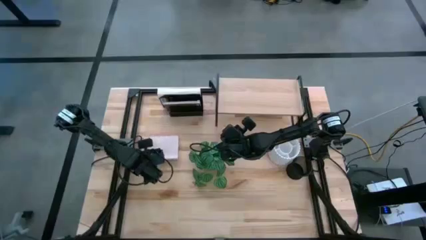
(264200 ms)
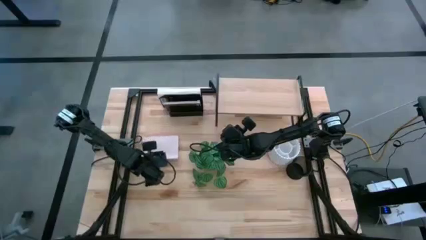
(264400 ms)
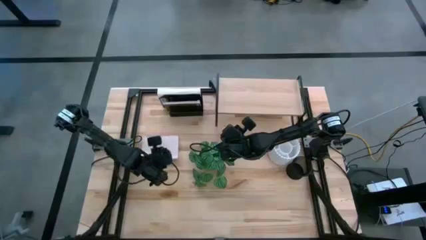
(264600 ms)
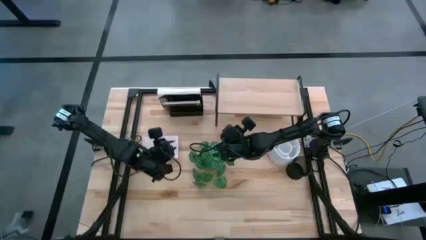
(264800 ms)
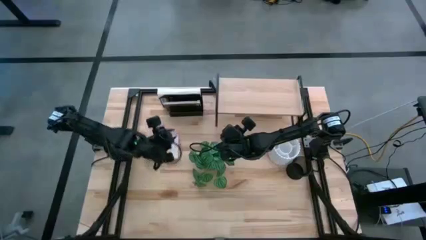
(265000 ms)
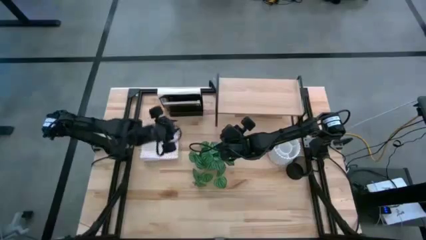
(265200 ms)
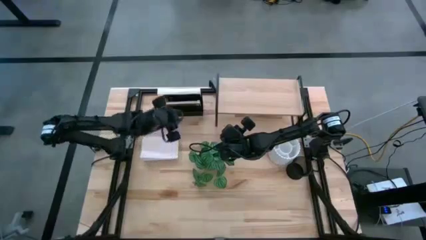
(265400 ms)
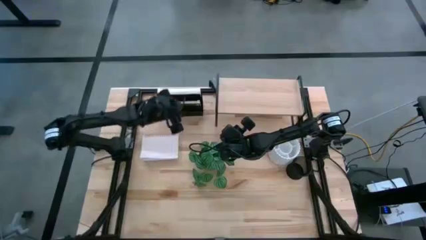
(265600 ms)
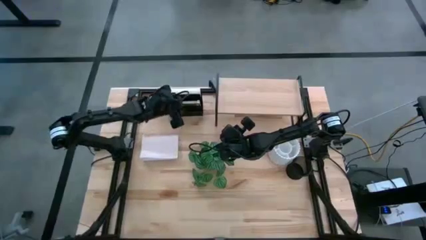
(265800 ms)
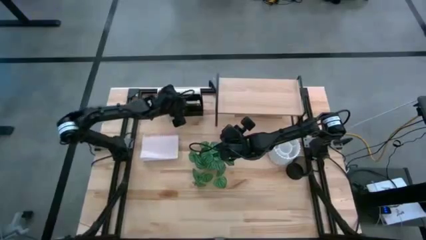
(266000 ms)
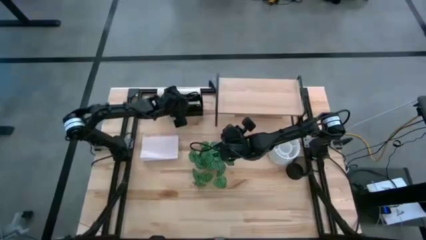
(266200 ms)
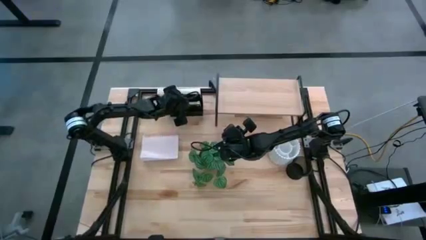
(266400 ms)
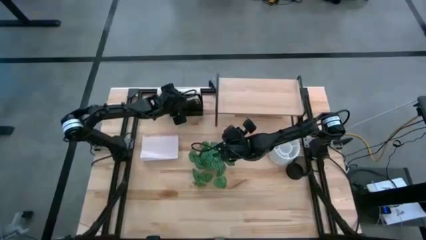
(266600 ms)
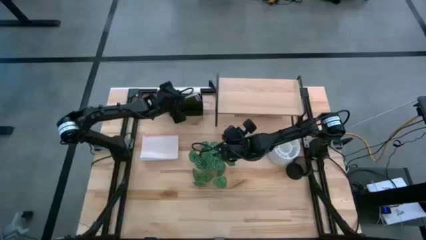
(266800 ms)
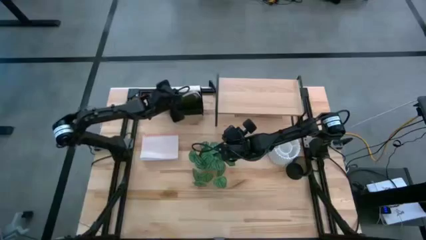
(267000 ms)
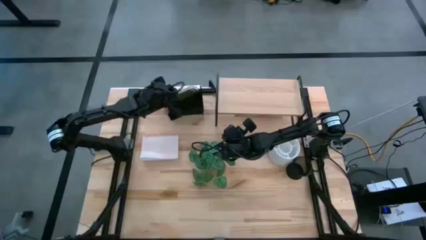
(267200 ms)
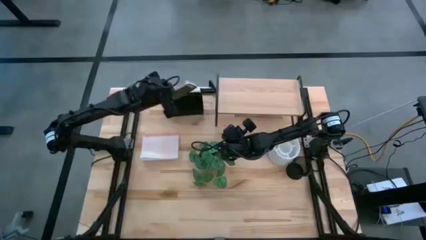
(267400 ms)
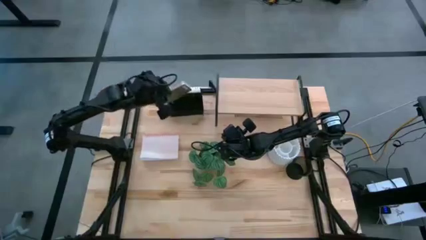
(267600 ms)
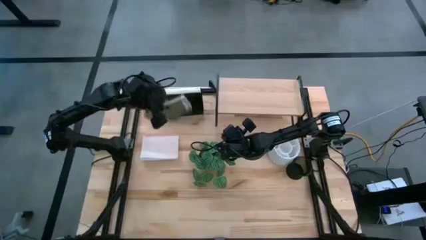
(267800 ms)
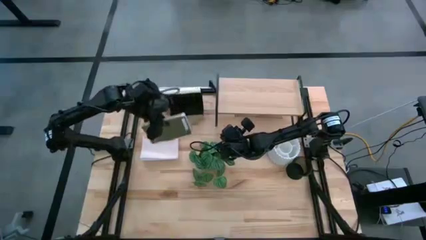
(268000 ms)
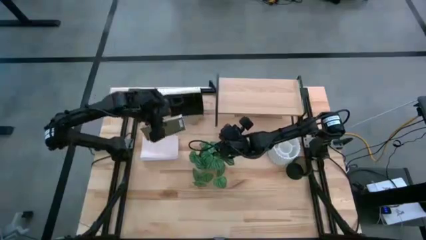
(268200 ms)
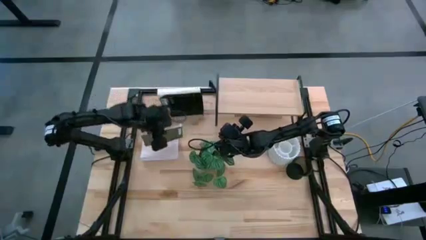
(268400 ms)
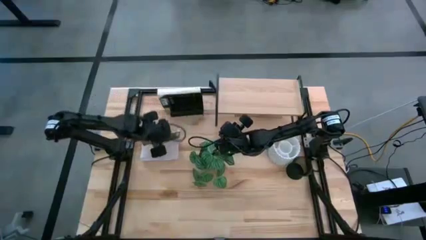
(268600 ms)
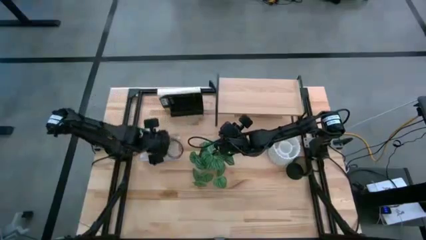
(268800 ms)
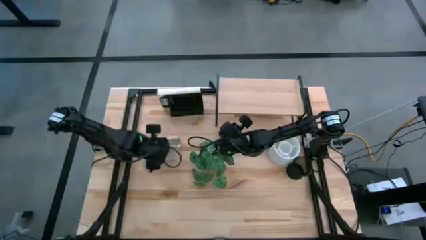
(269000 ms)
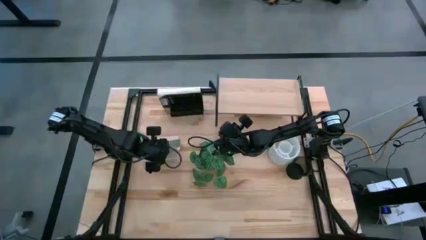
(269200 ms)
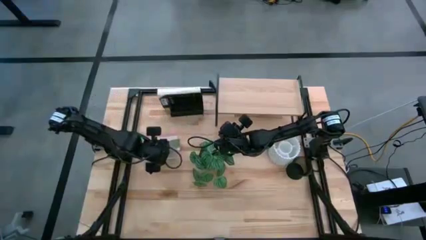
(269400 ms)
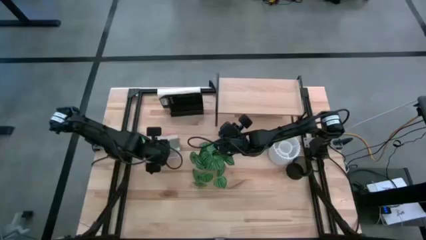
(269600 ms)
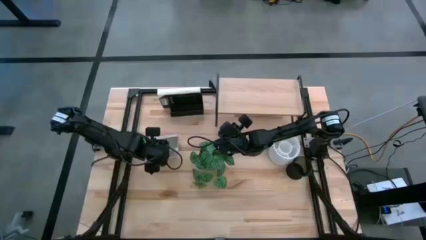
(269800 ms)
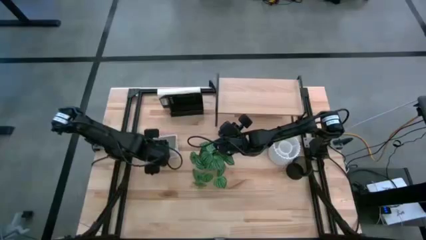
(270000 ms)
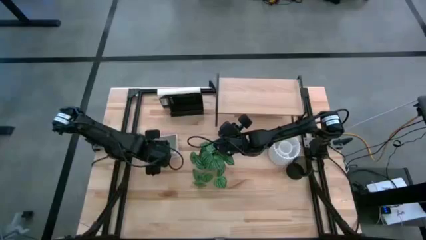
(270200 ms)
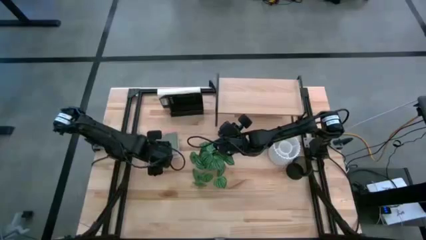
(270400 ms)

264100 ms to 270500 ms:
Task: Stock shelves
Remove the green notebook from the black mesh bookshelf

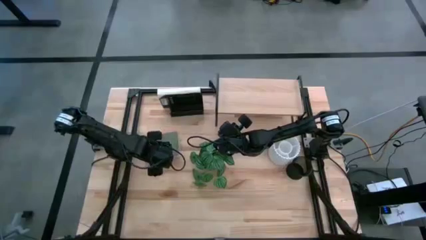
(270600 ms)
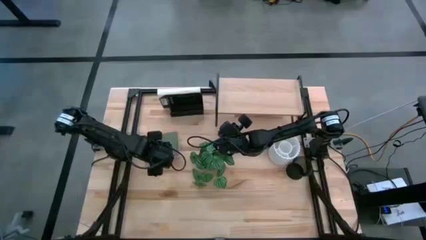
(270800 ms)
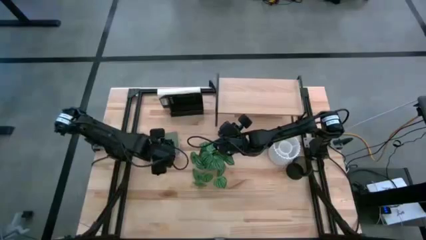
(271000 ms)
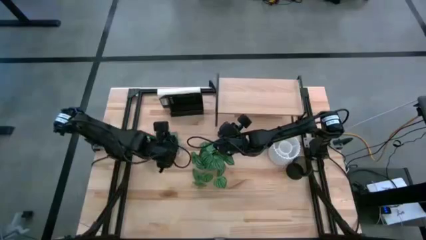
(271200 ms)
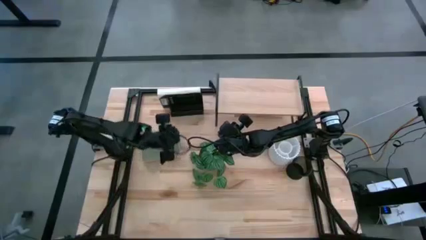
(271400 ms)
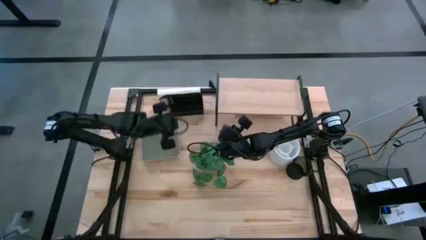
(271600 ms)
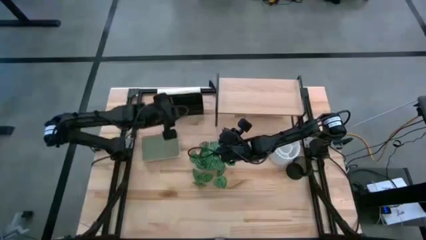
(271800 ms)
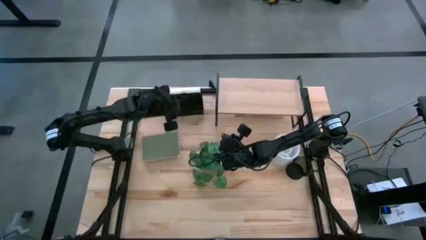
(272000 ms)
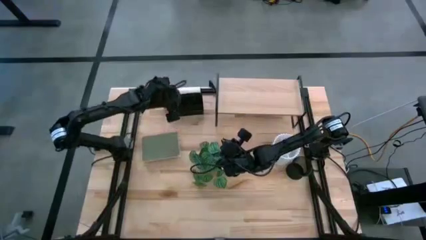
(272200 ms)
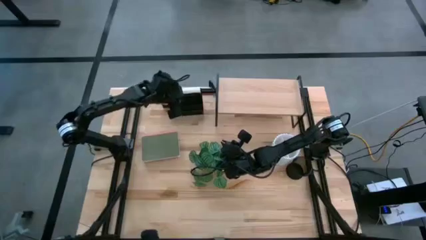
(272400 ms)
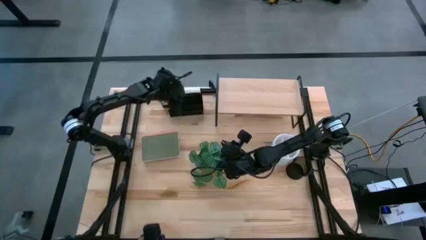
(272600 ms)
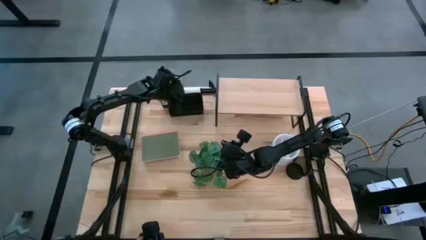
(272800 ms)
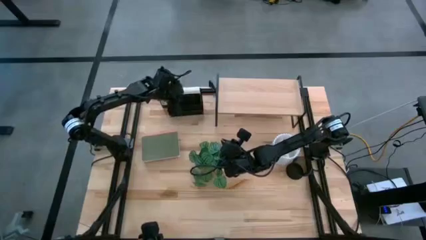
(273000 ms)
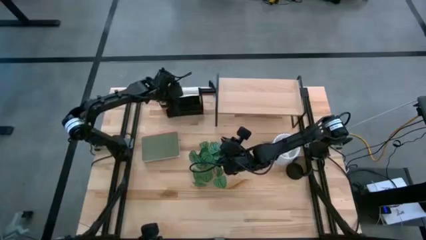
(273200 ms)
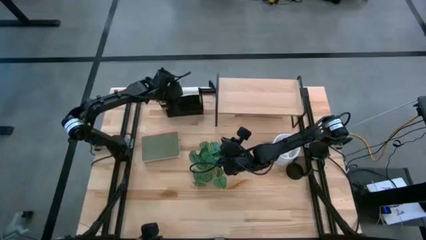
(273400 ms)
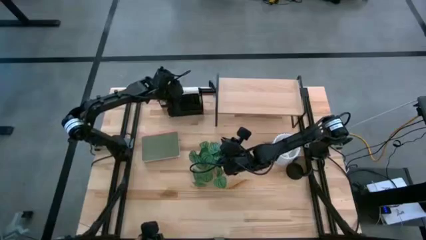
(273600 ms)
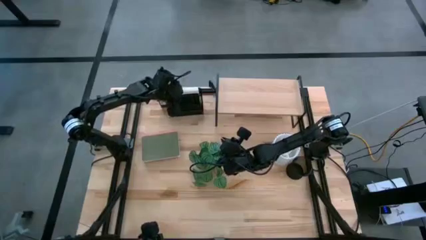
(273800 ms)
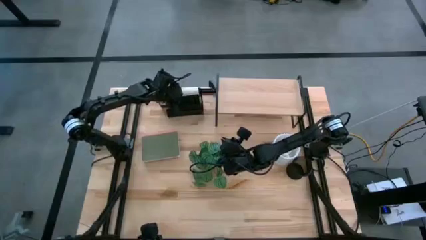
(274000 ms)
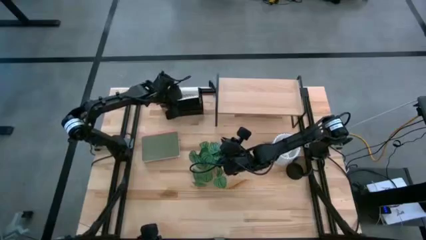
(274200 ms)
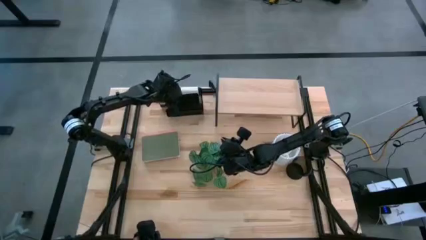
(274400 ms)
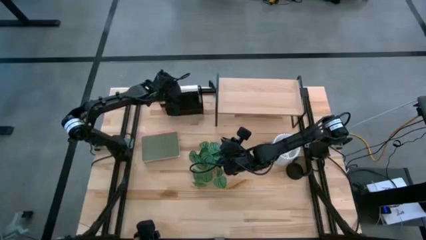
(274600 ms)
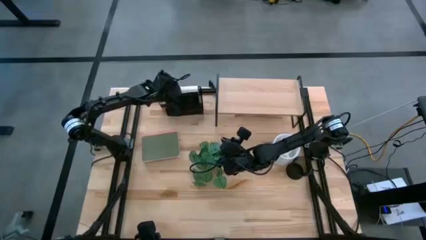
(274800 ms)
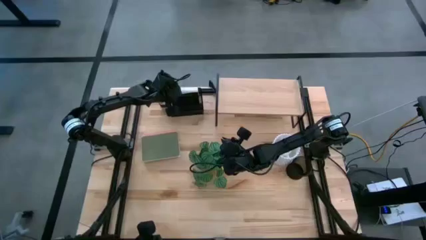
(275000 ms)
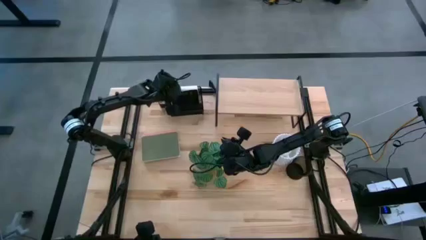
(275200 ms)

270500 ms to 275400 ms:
Remove the black book from the black mesh bookshelf
